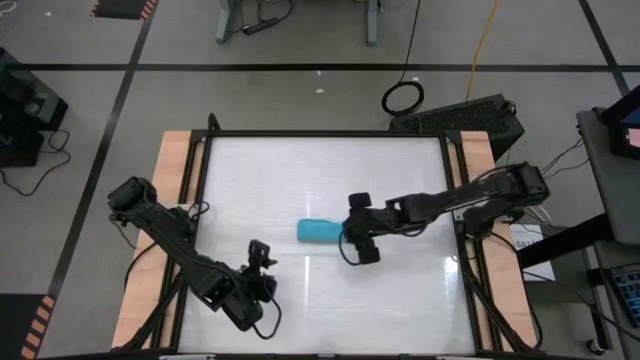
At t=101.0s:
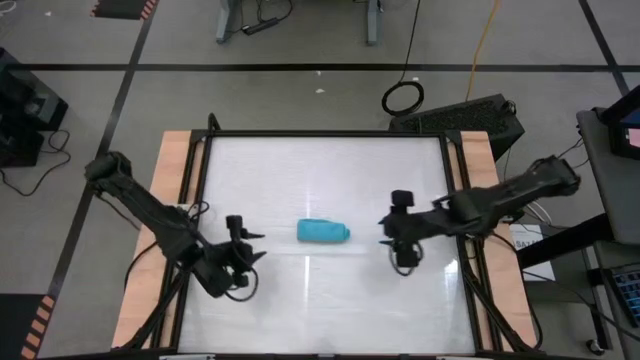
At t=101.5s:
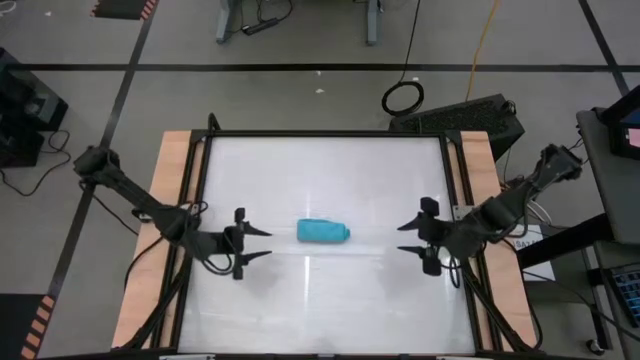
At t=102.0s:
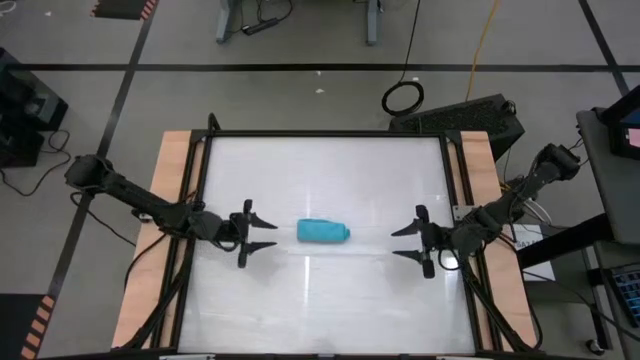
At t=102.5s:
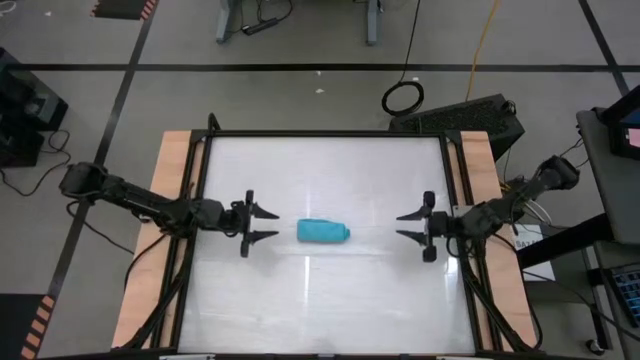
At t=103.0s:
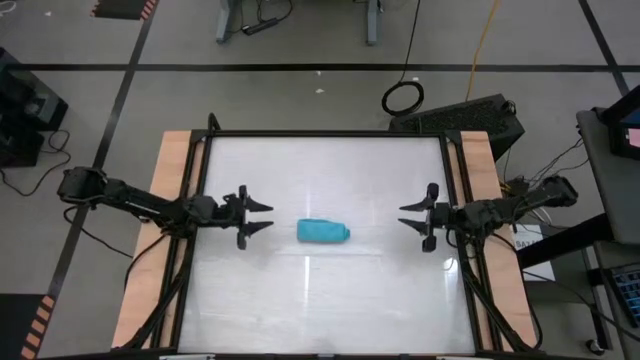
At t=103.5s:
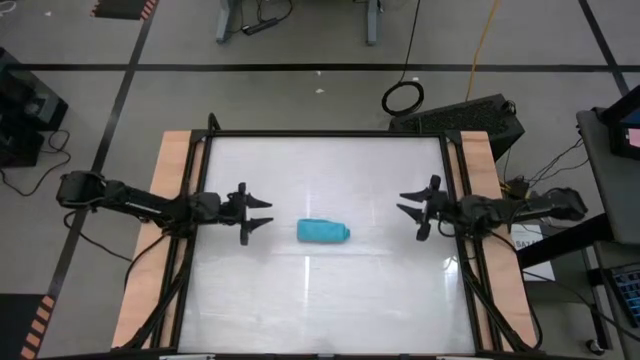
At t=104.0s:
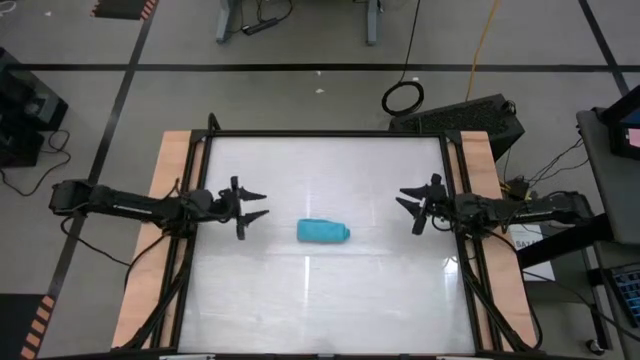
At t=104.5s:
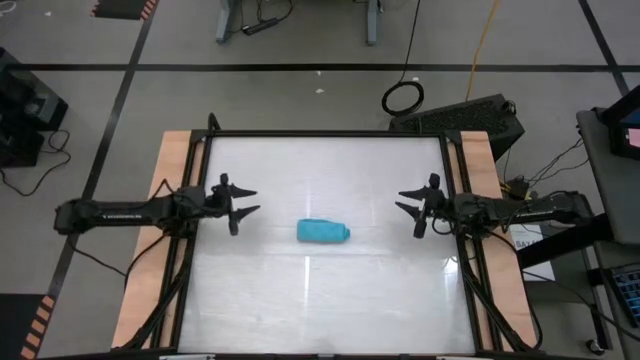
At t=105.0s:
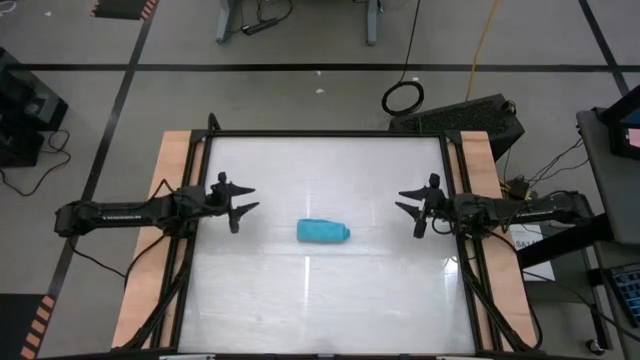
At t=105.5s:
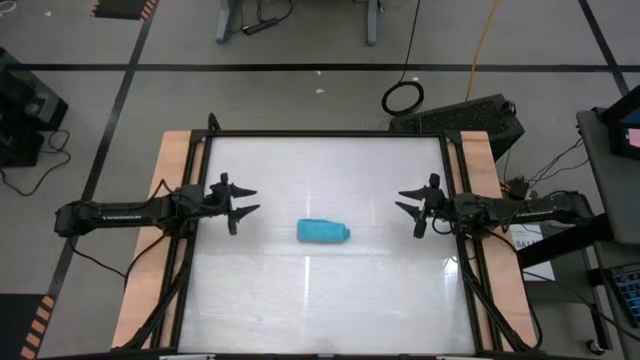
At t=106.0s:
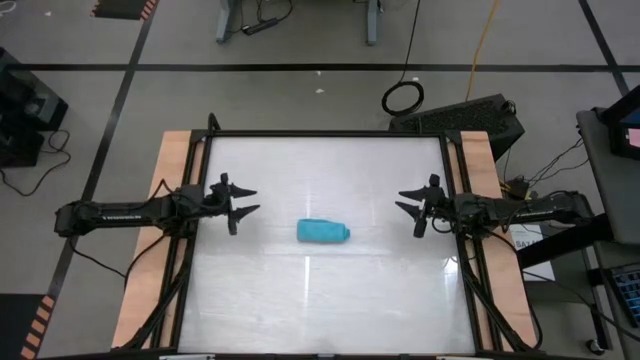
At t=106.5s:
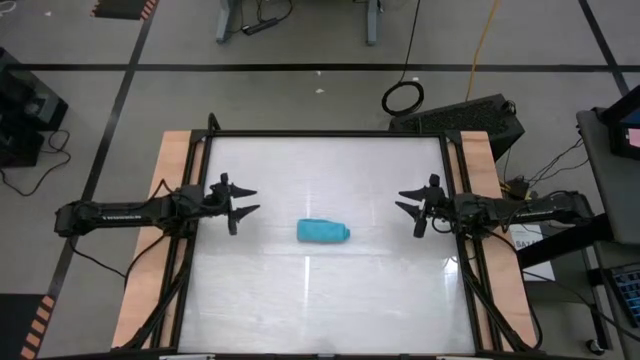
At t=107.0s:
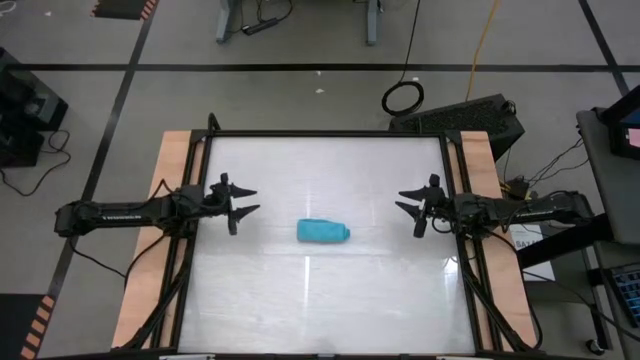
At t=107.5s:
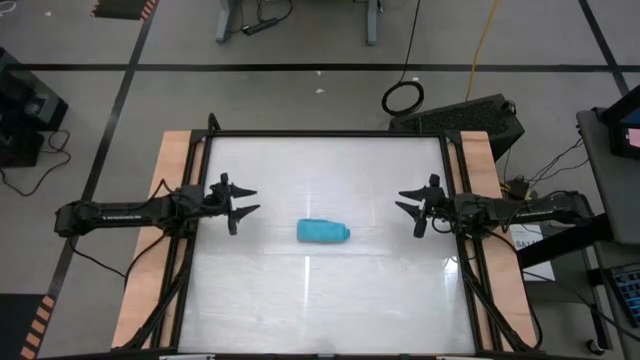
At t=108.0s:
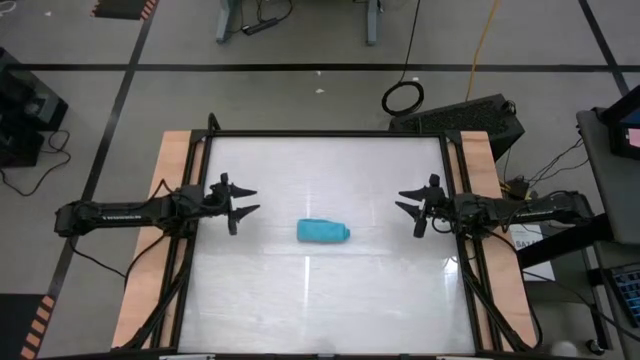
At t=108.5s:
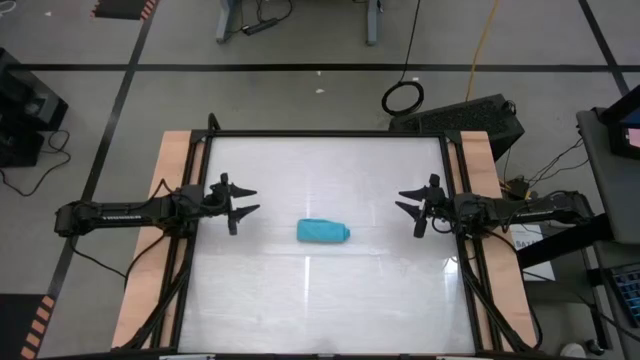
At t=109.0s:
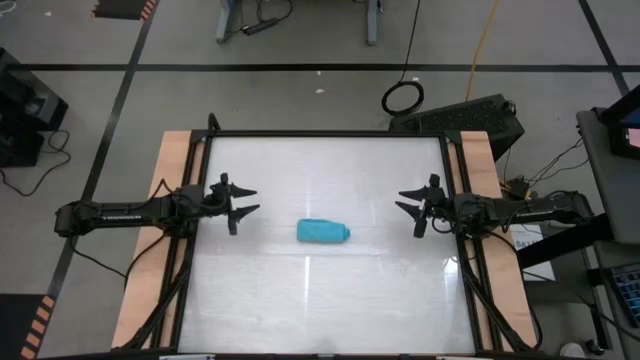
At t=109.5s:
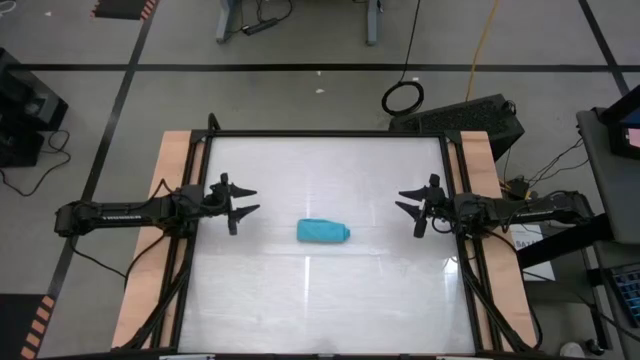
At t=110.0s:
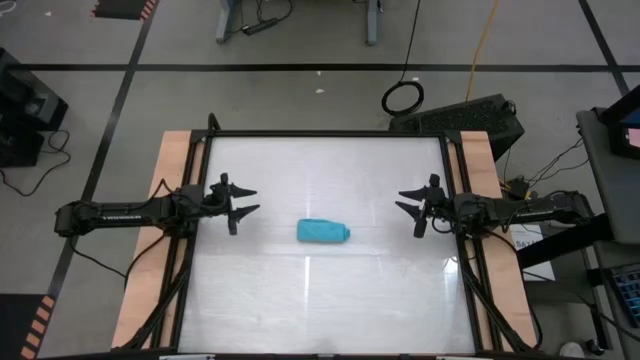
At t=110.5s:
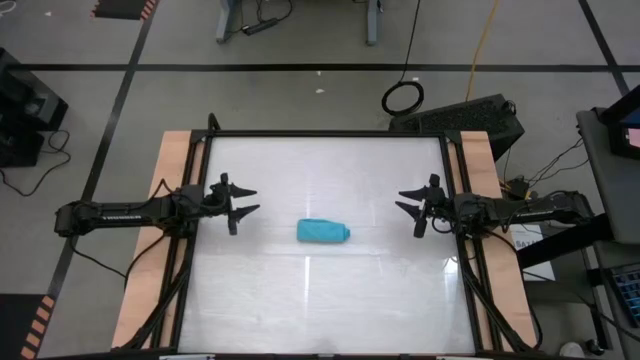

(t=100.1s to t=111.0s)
Task: Roll towel into tight, uniform cylinder
Return to Home Position

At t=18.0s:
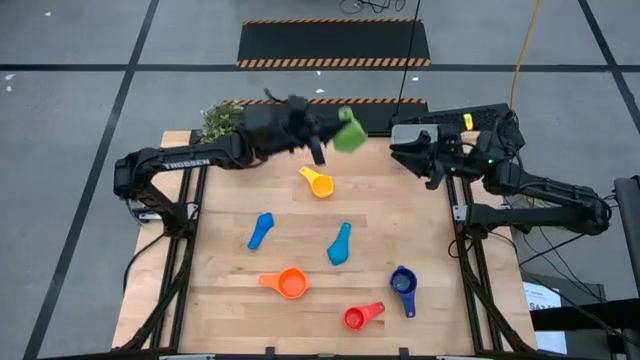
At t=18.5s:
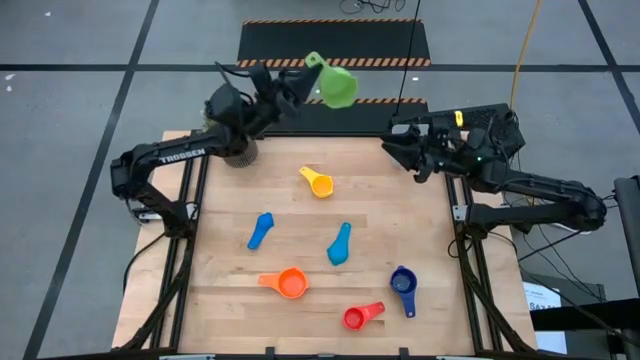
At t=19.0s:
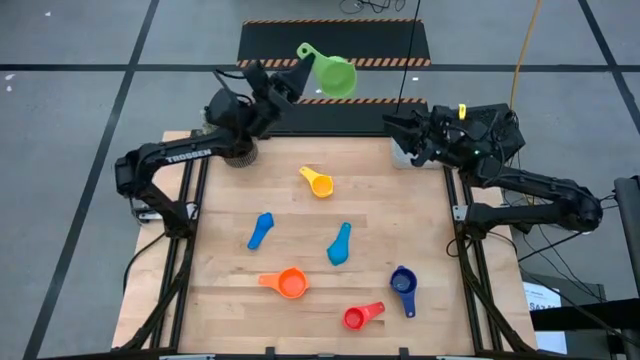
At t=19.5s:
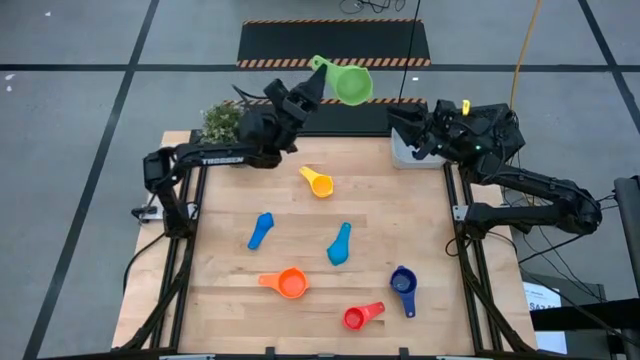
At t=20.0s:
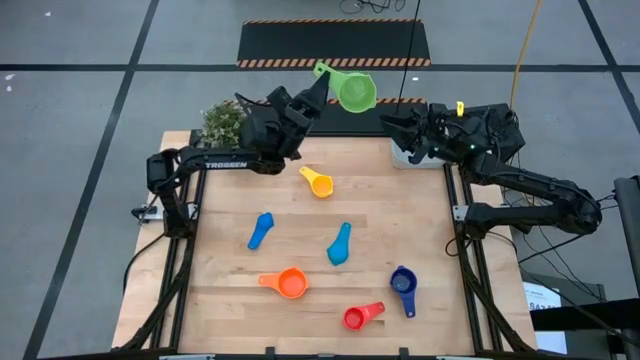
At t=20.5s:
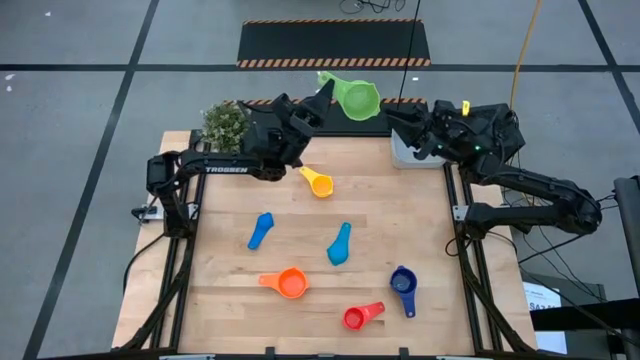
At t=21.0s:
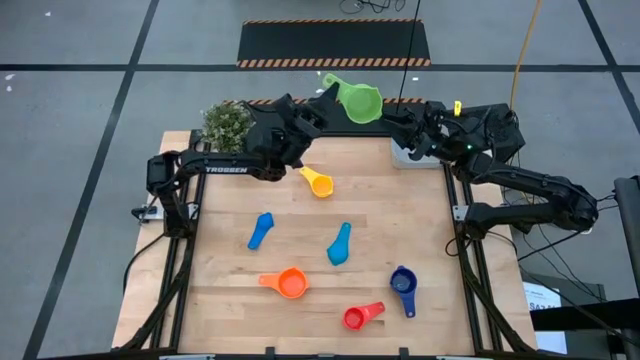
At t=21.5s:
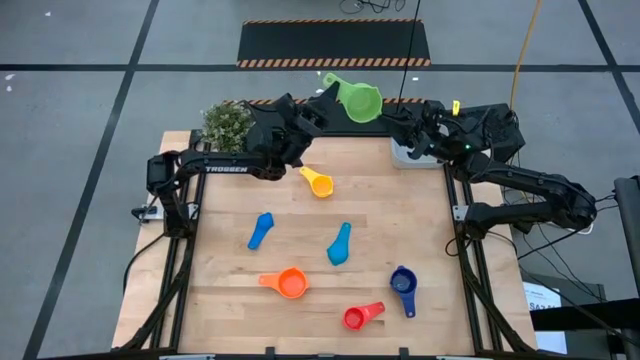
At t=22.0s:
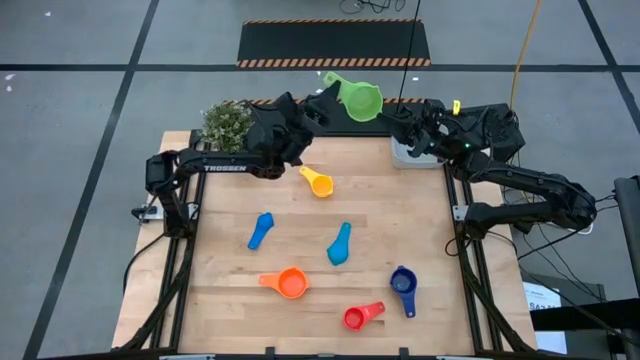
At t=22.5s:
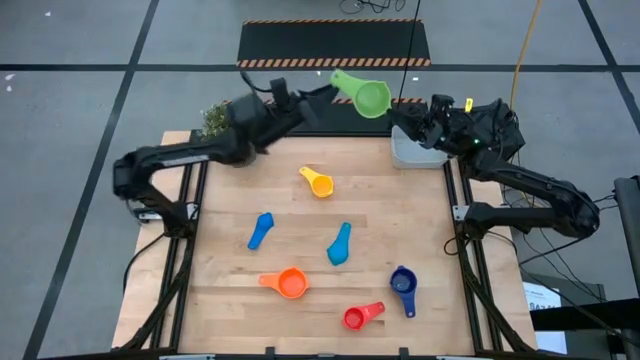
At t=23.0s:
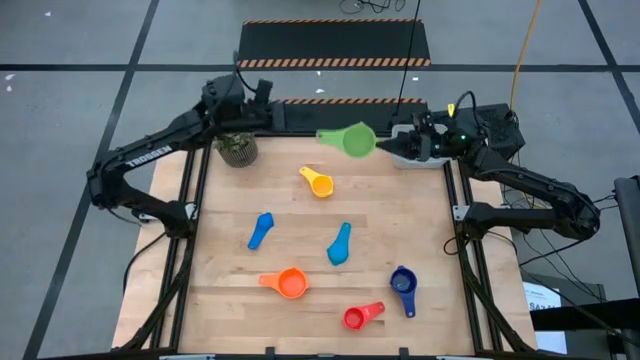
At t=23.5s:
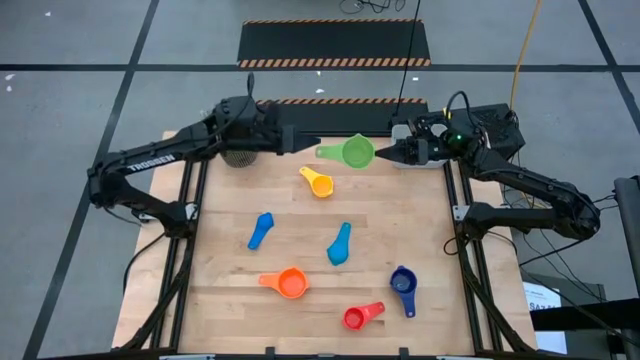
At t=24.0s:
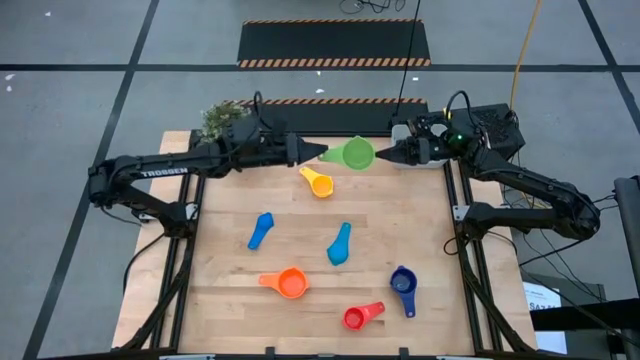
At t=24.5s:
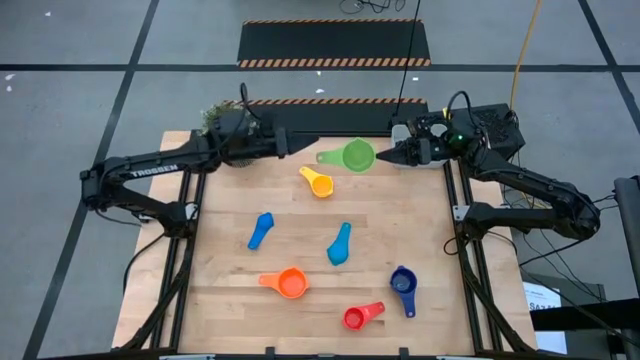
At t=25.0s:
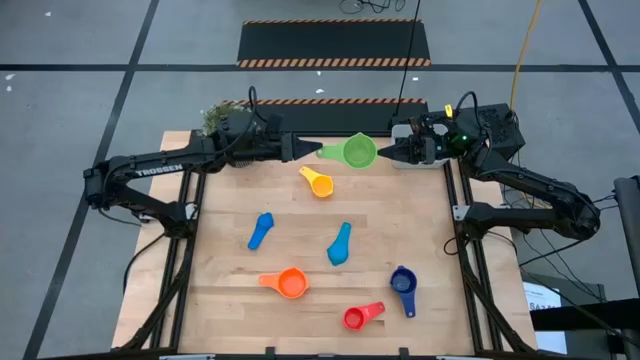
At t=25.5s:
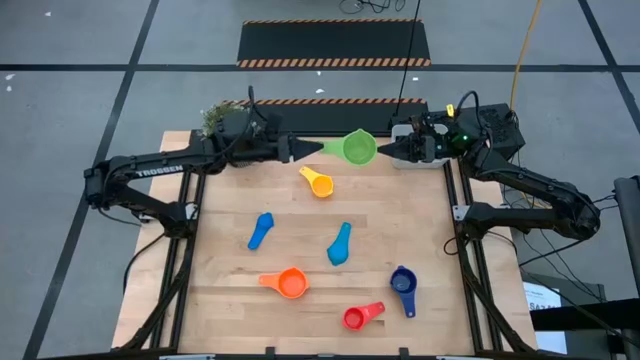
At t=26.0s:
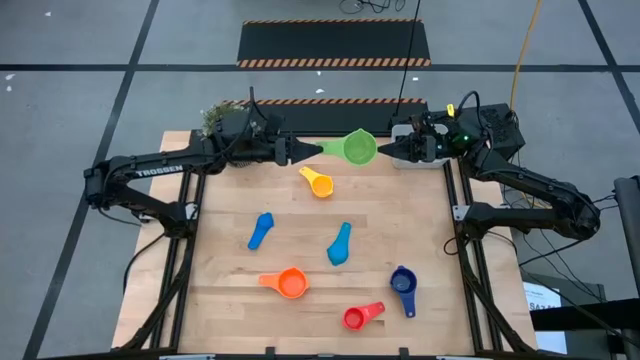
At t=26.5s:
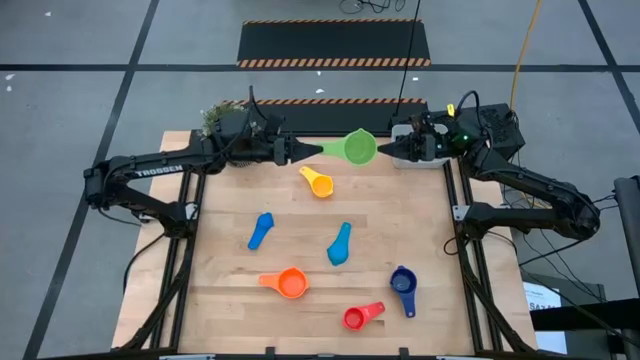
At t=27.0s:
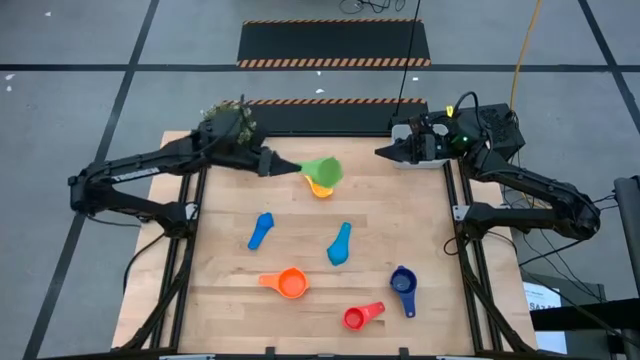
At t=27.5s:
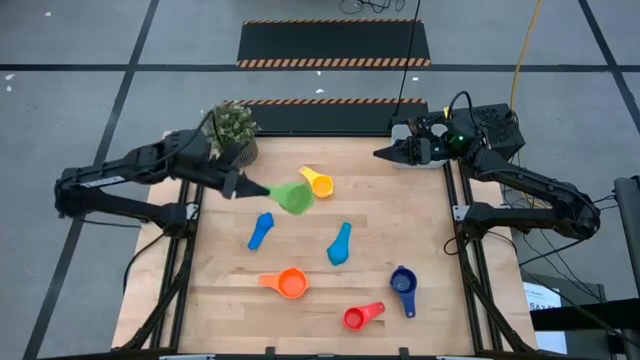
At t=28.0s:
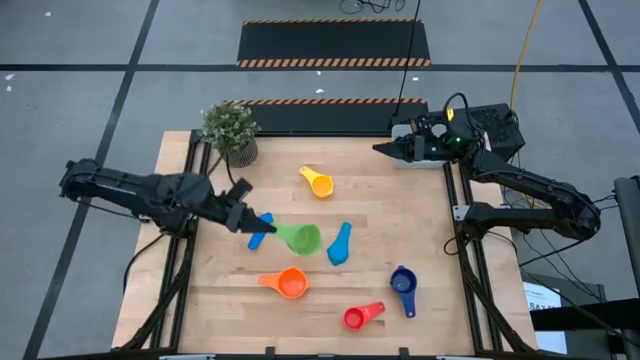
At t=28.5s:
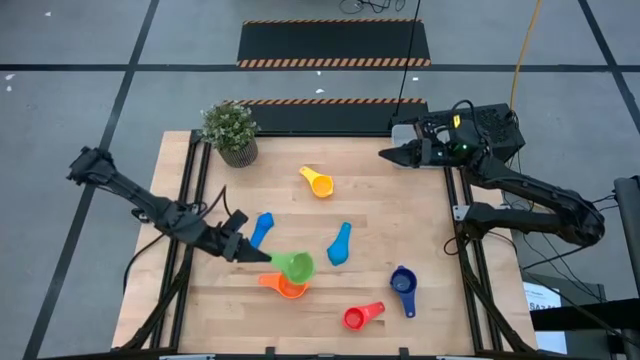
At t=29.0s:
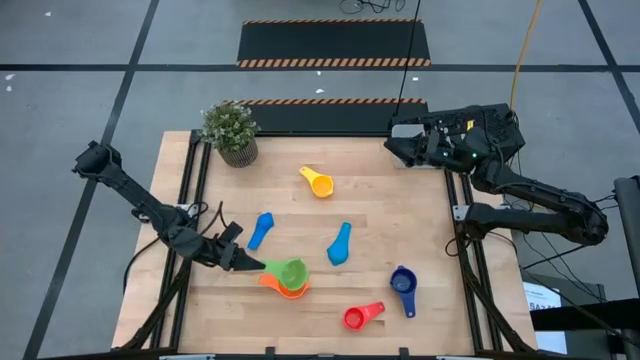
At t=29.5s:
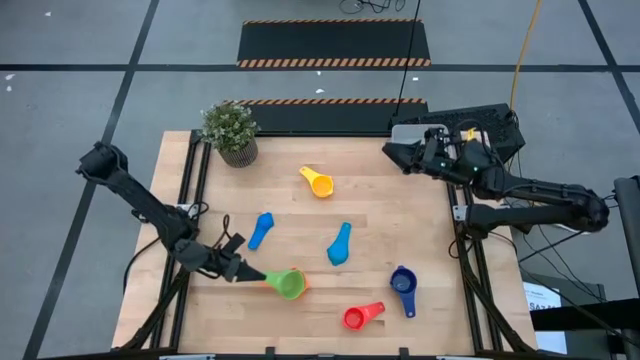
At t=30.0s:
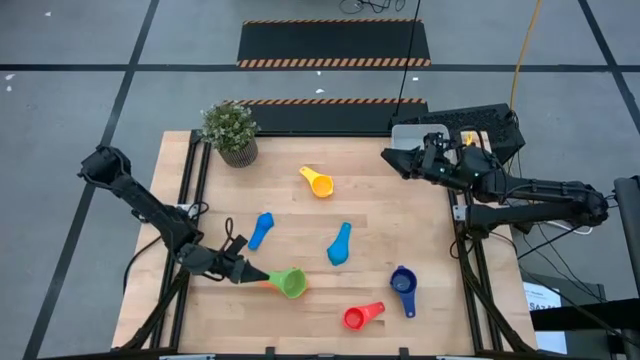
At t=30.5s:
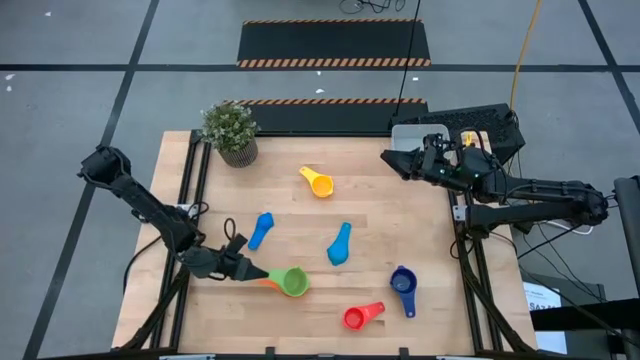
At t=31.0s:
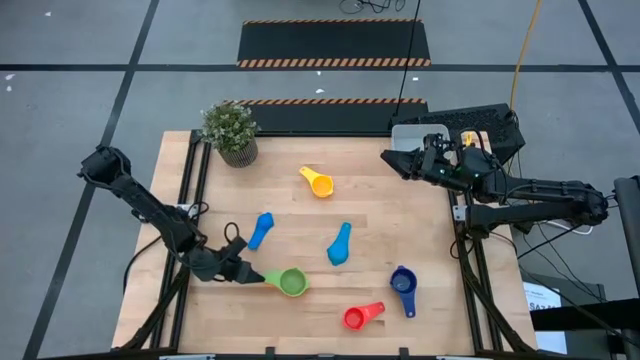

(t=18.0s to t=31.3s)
Task: Nest measuring cups in basket
Stack the green measuring cup on the orange measuring cup
